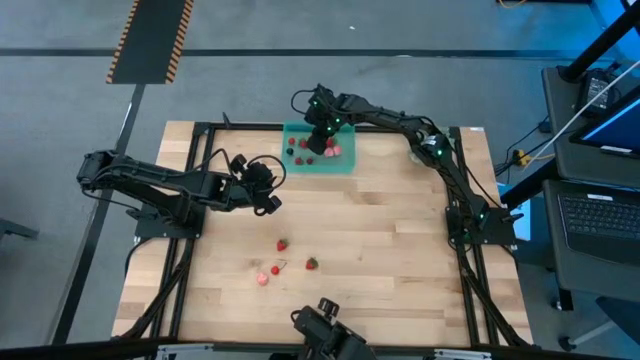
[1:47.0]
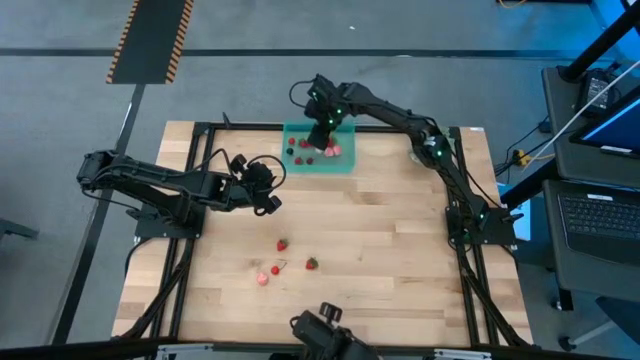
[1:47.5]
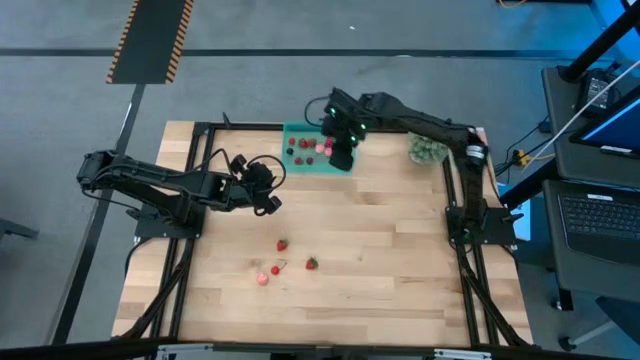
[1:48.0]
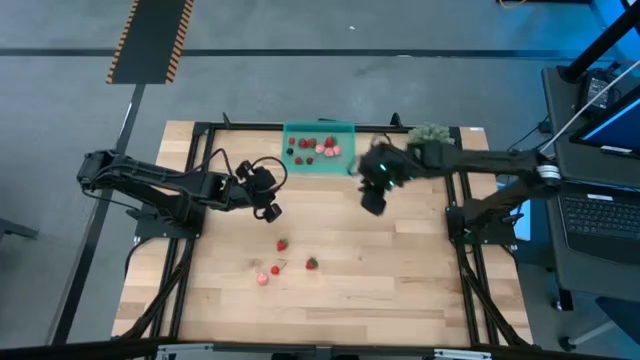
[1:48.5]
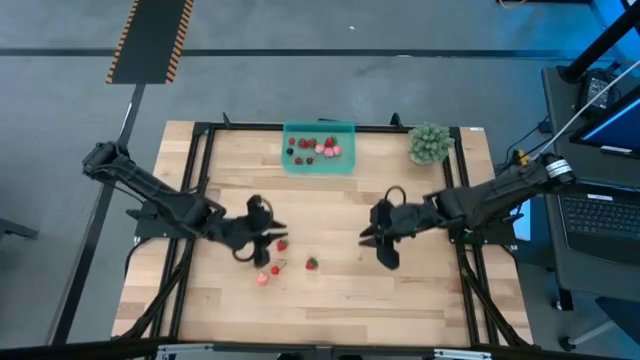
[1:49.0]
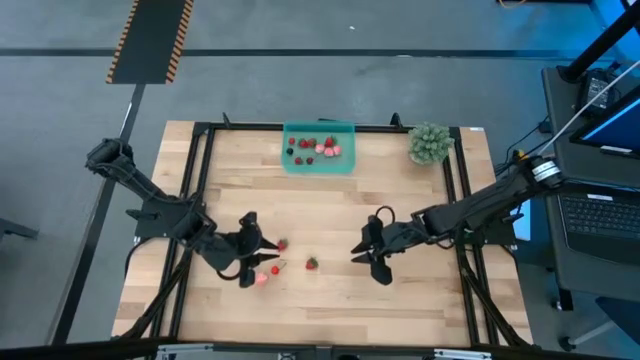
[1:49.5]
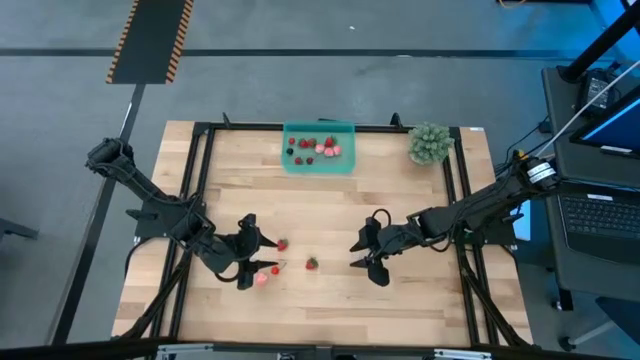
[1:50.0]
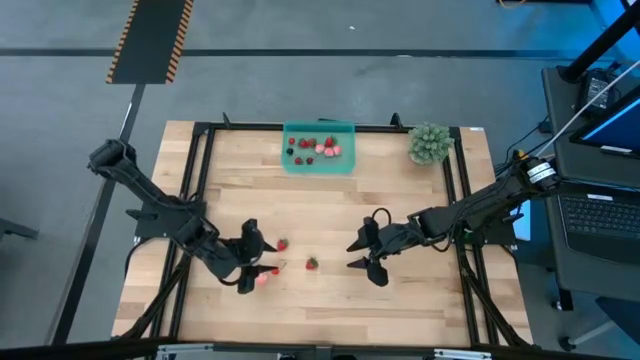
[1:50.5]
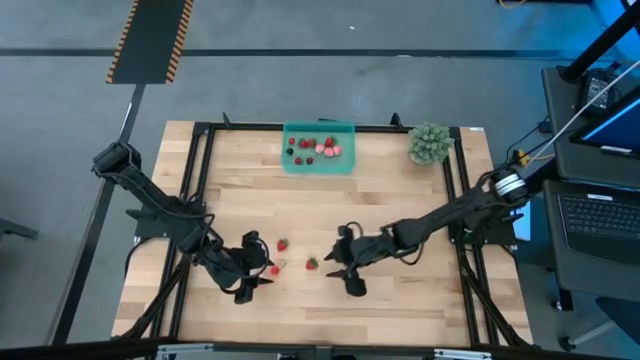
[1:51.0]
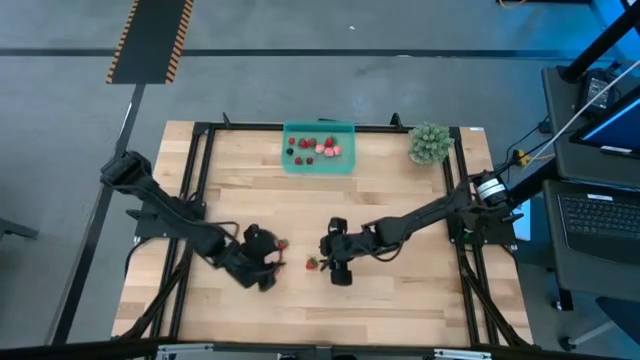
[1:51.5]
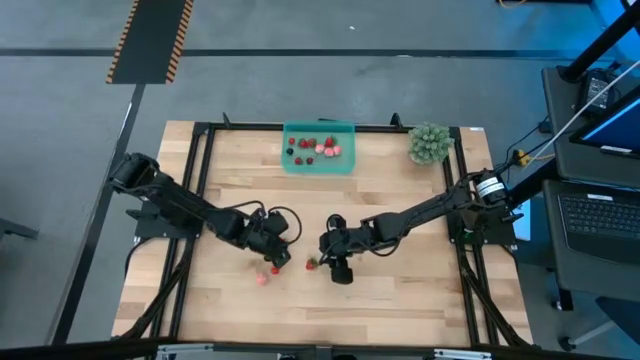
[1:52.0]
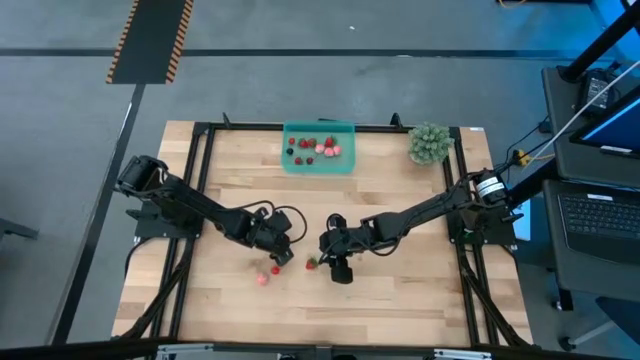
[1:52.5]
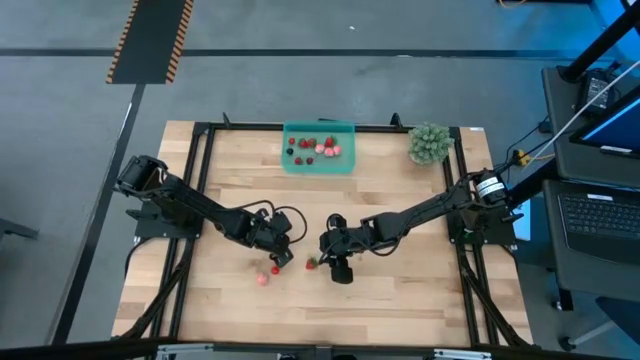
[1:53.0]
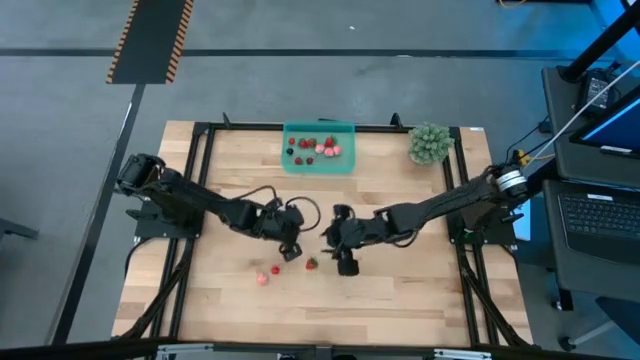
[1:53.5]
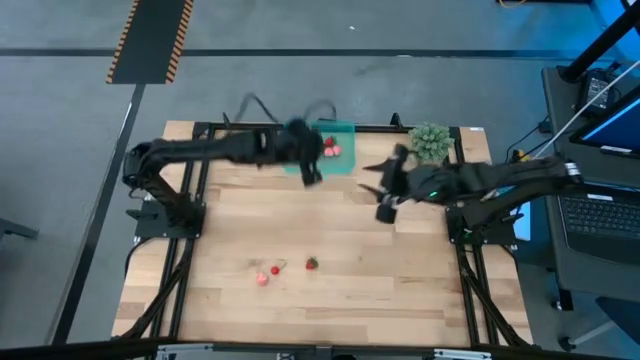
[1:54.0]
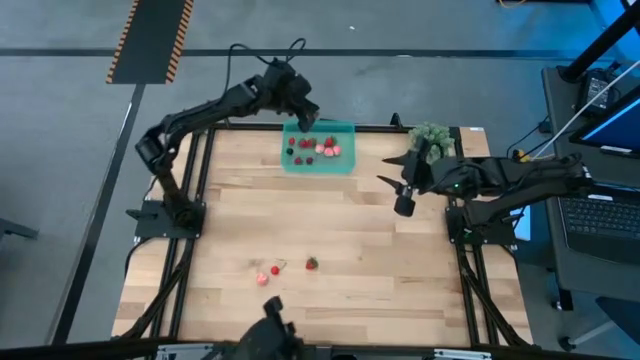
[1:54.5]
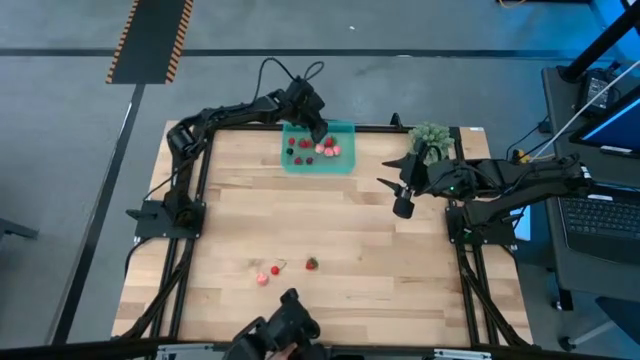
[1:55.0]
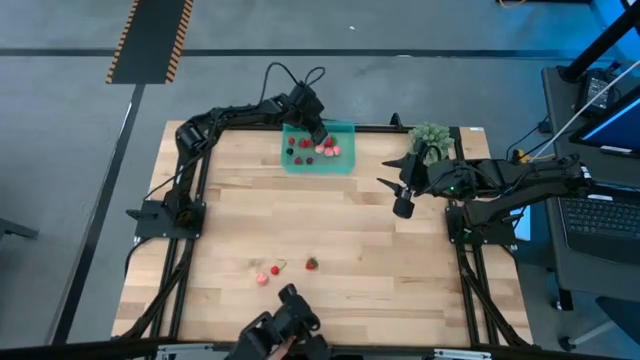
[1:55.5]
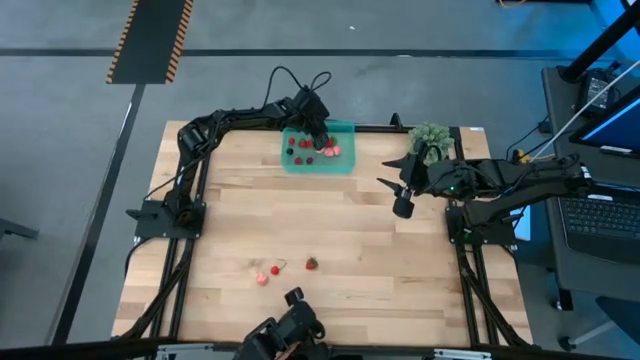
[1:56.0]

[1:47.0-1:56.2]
Task: Pick and placing Produce into tupperware
Put the red strawberry into the green container

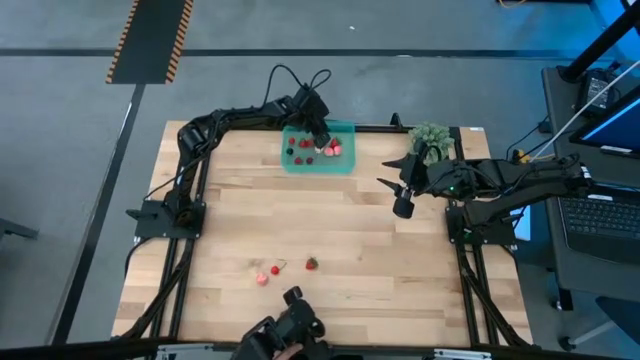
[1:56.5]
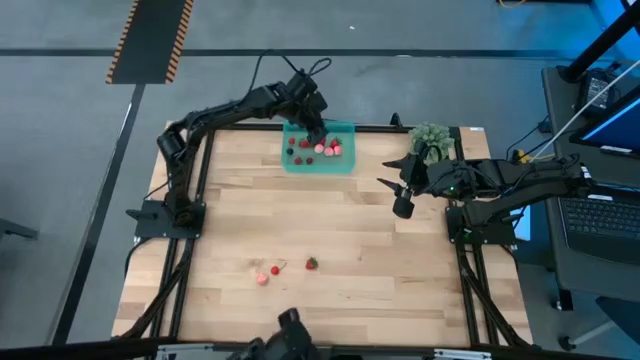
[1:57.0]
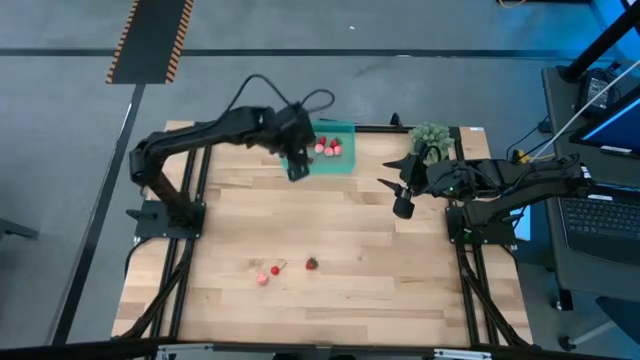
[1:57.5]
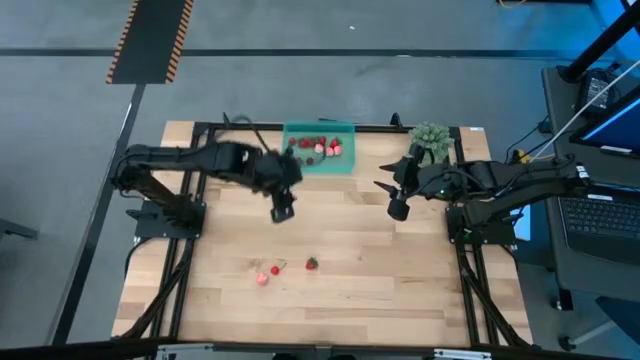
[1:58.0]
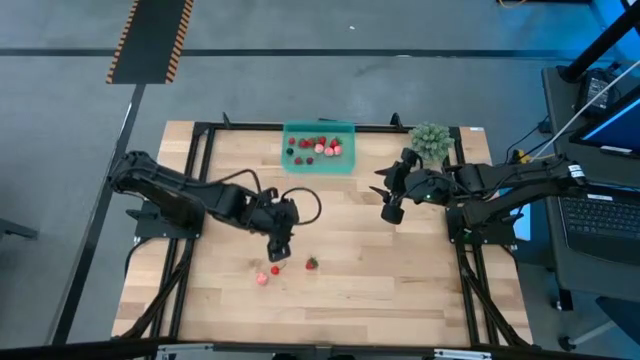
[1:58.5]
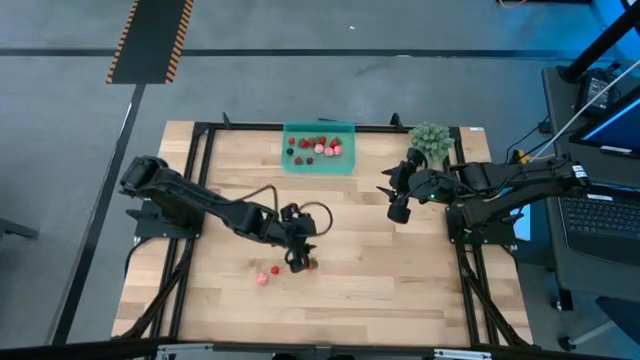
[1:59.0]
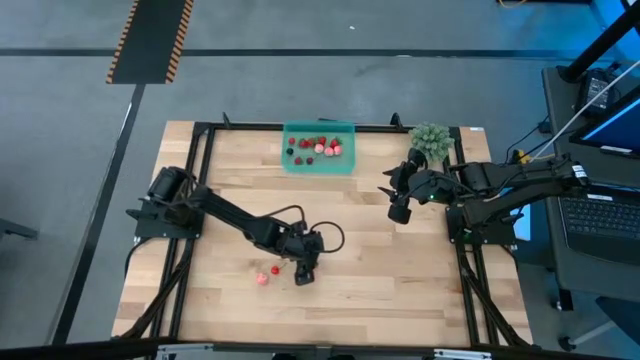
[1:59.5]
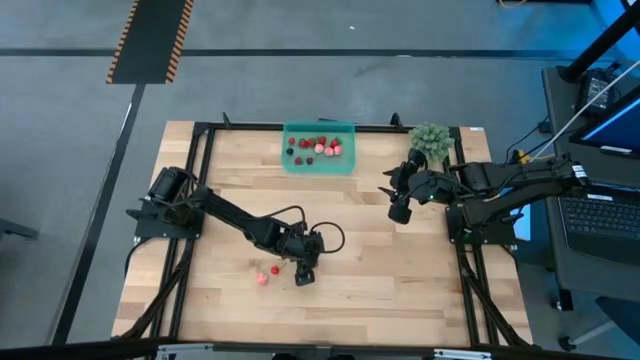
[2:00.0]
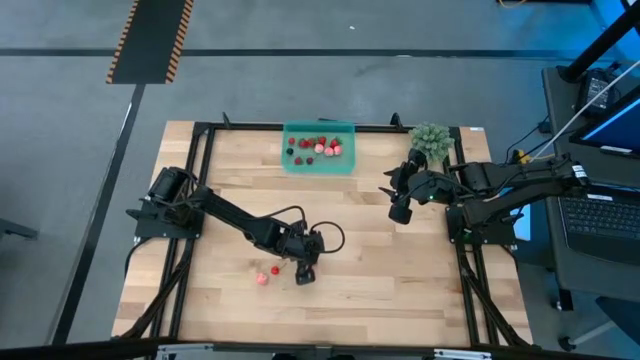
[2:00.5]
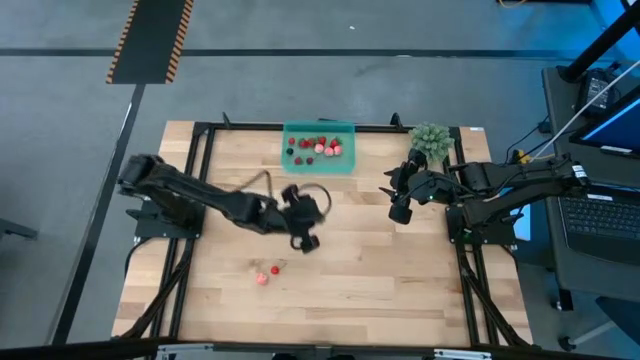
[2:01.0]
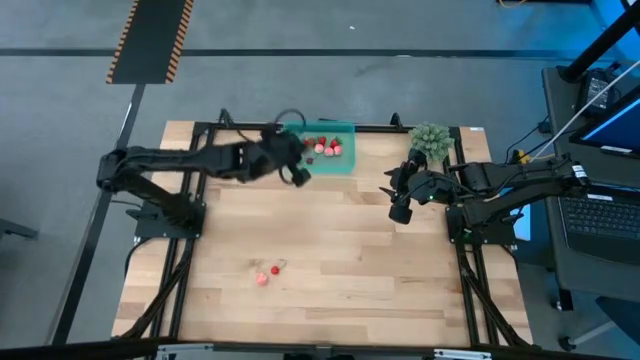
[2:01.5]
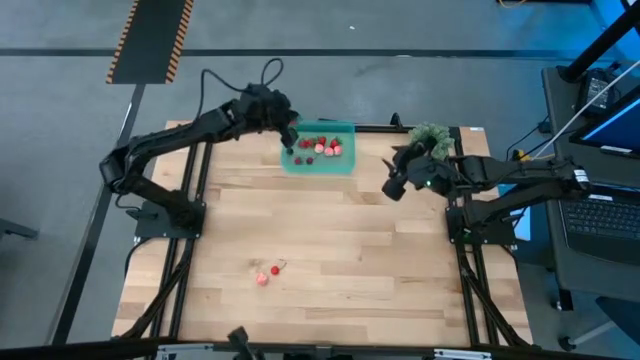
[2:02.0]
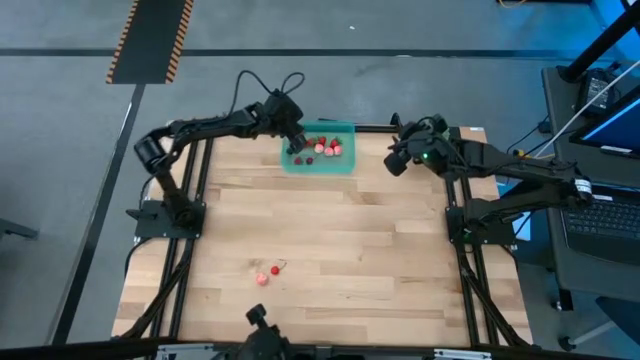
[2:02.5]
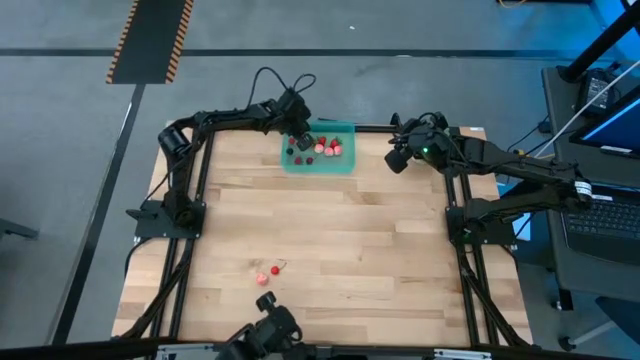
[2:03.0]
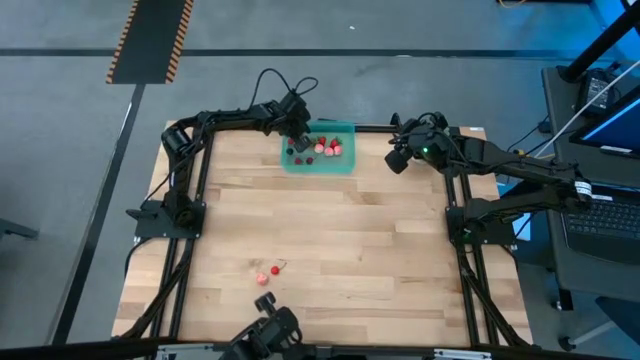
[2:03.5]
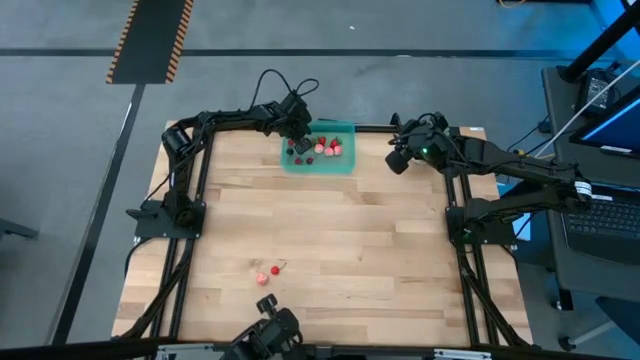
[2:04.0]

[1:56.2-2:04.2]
Put the red strawberry into the green container

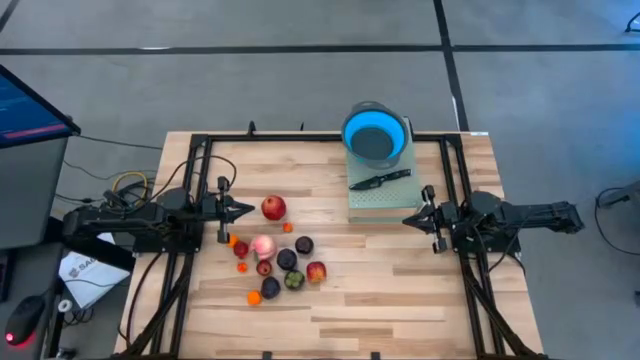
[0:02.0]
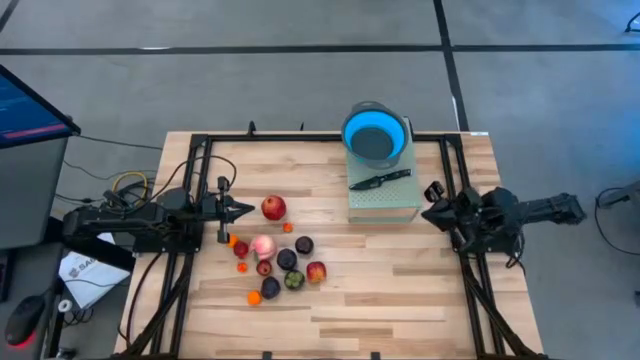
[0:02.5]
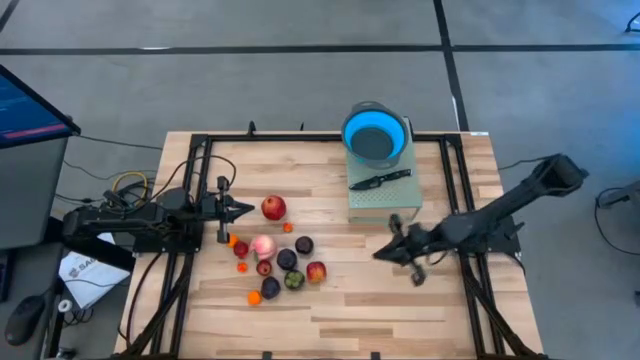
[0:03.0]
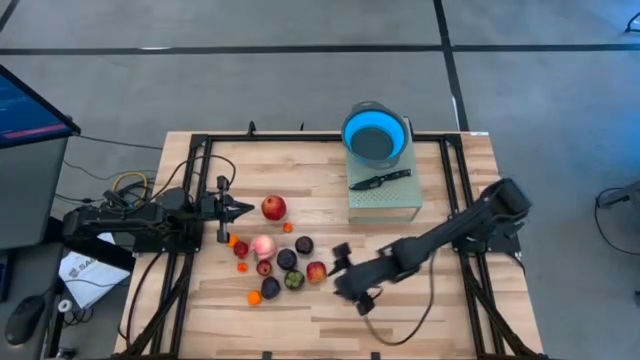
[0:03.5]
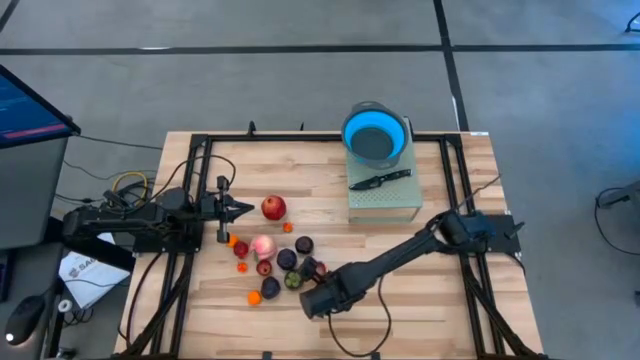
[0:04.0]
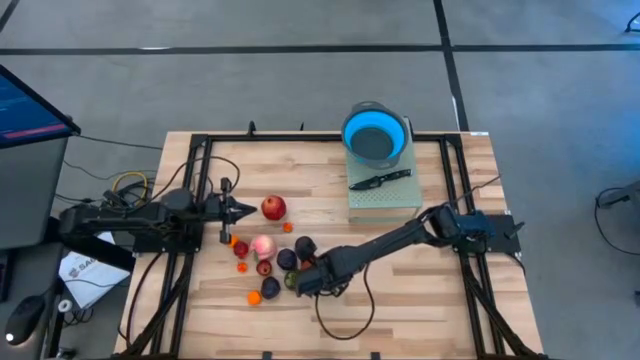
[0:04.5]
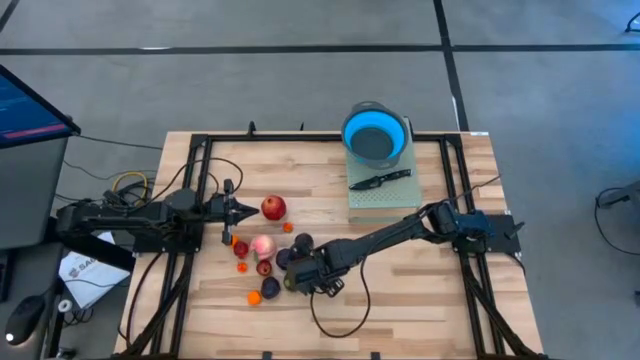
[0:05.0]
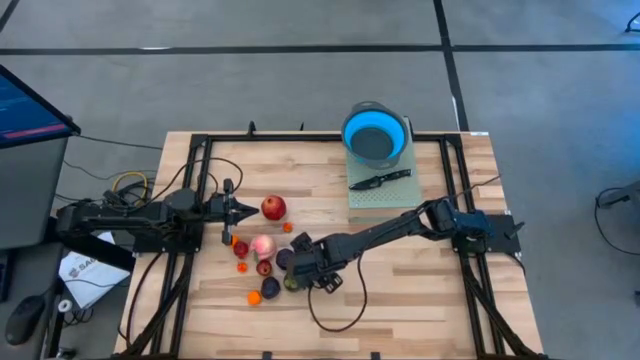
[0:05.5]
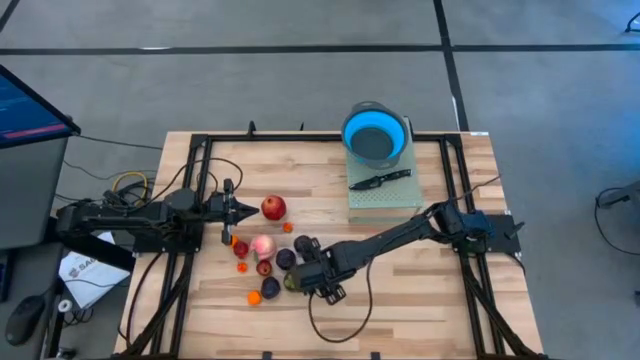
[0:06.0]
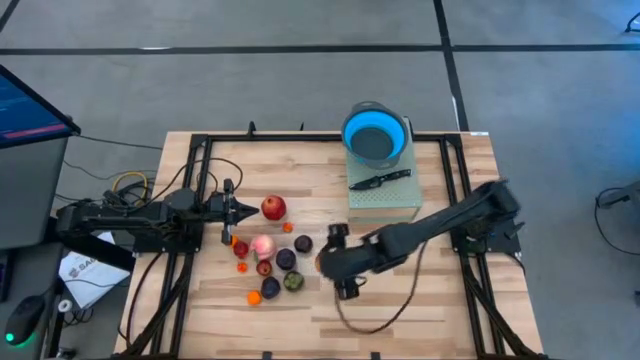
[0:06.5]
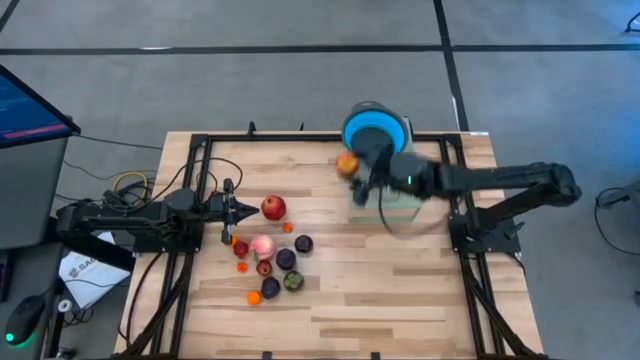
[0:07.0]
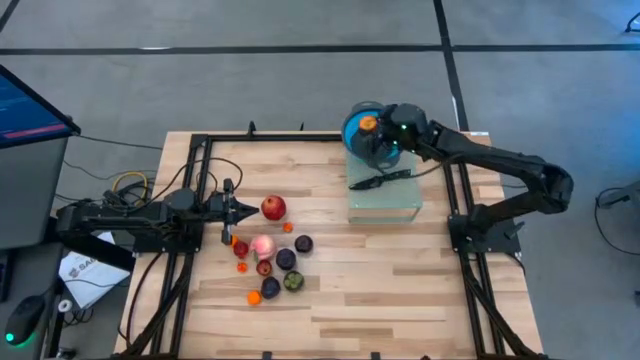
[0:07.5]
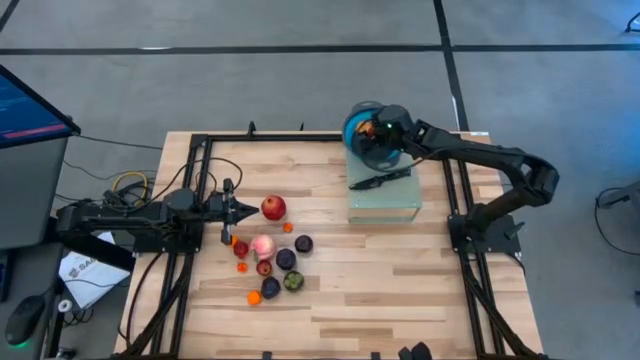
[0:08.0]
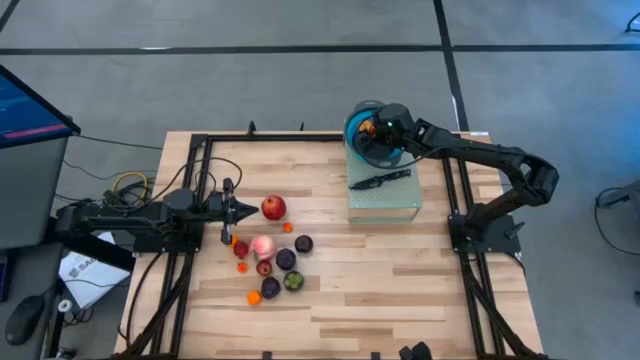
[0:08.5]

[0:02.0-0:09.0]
Task: Pick & Place Fruit
Put the red apple into the blue strainer bowl on the shelf
